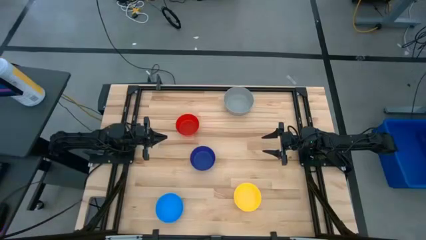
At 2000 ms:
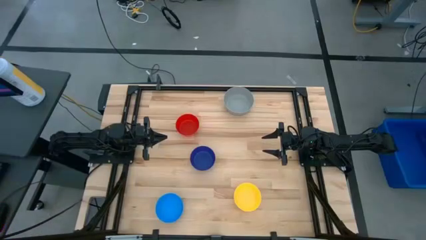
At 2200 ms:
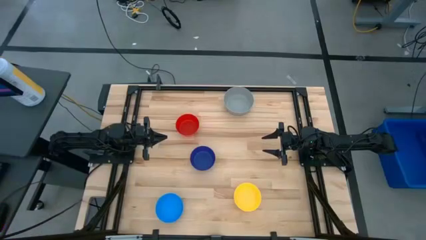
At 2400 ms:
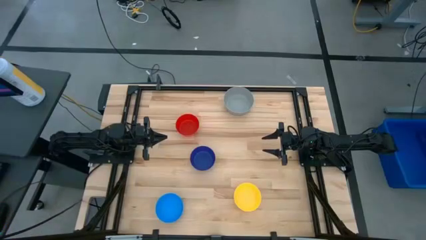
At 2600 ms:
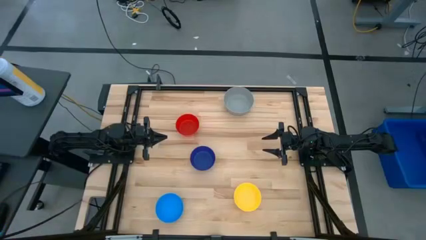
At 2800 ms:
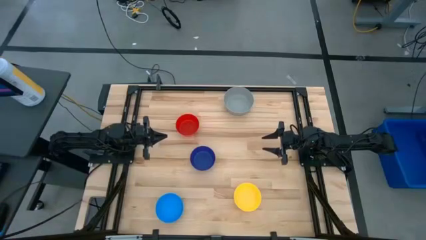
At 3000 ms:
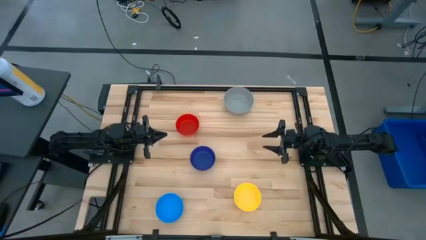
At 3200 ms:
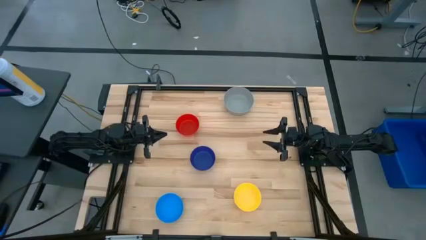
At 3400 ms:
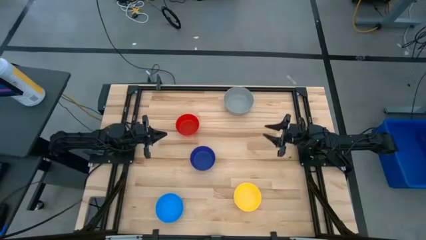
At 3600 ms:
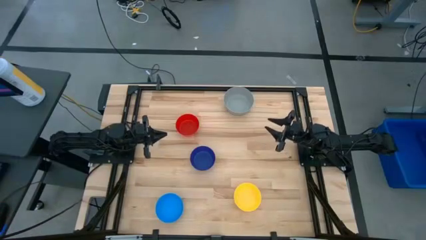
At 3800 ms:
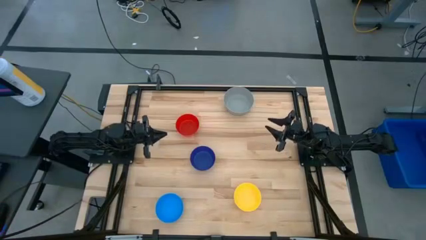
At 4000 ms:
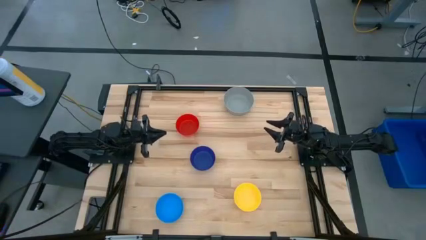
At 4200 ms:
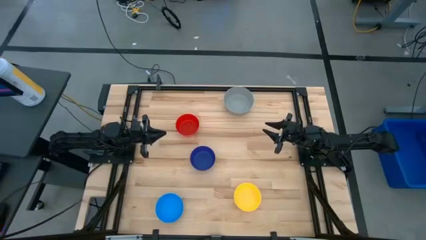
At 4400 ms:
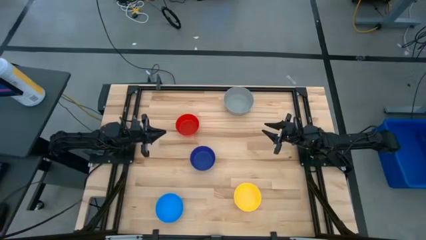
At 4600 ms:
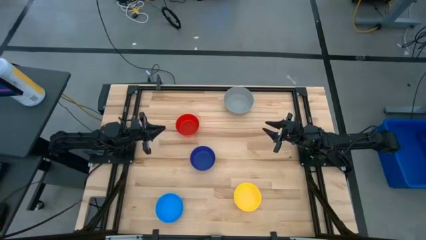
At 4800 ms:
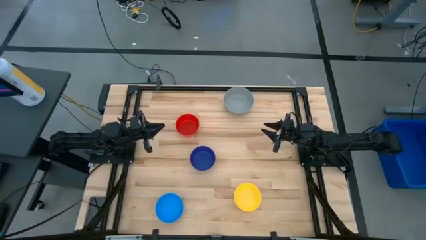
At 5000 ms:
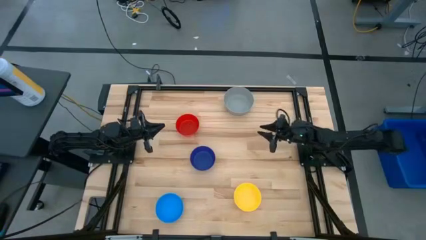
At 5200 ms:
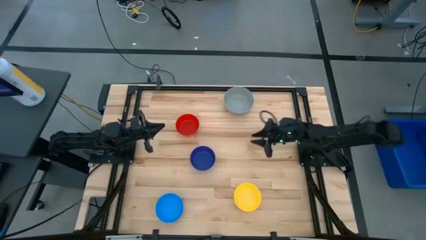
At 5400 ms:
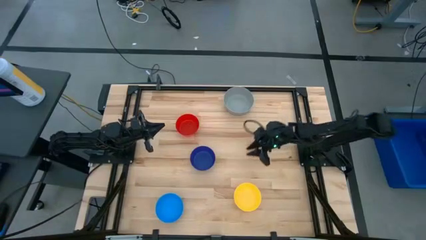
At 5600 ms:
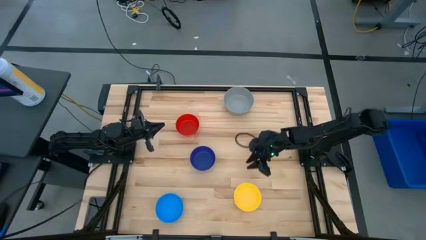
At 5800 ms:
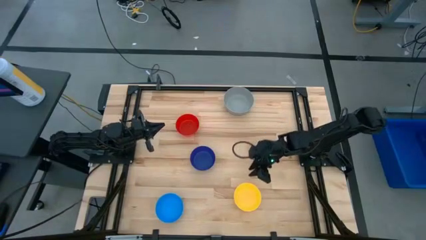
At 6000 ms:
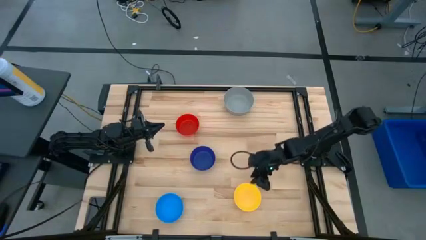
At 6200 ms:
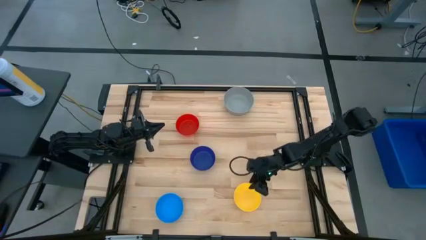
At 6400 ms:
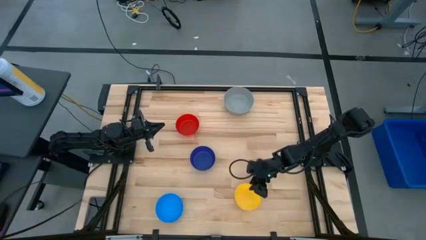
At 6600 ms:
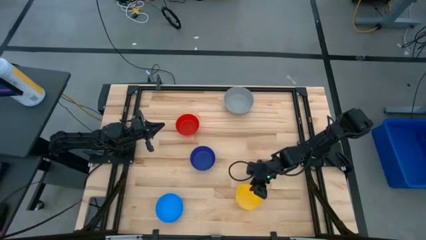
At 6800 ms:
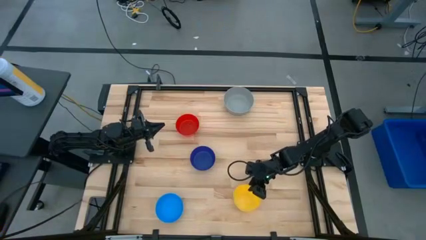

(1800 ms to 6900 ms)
Stack the yellow bowl on the gray bowl

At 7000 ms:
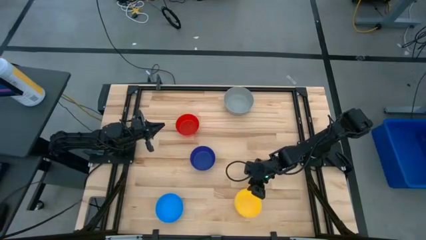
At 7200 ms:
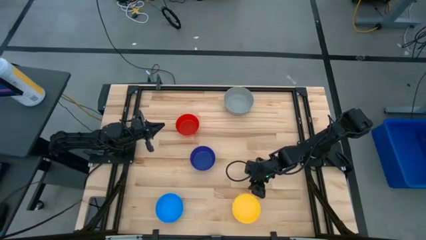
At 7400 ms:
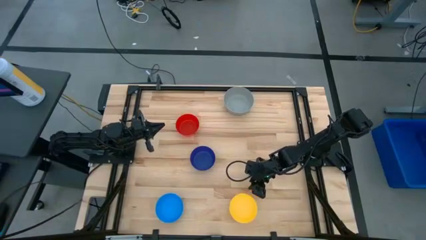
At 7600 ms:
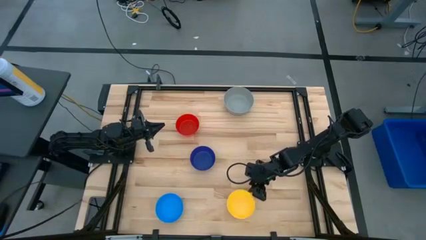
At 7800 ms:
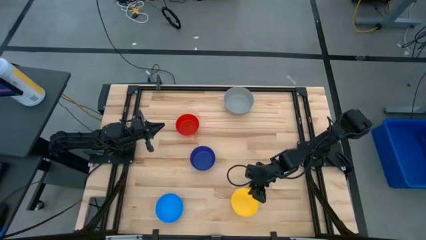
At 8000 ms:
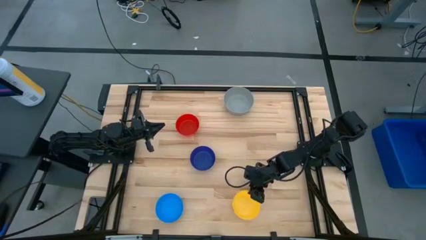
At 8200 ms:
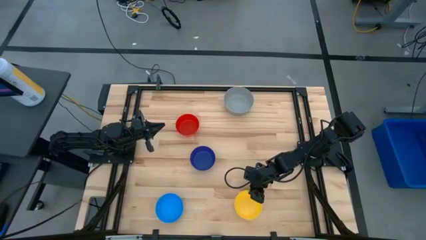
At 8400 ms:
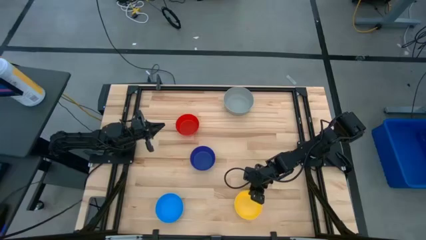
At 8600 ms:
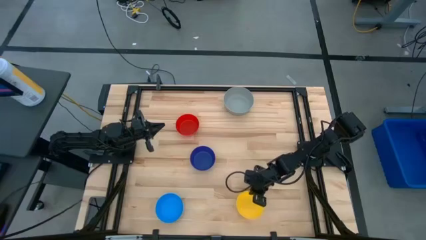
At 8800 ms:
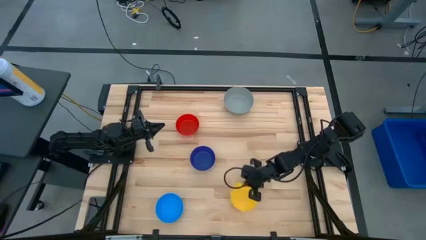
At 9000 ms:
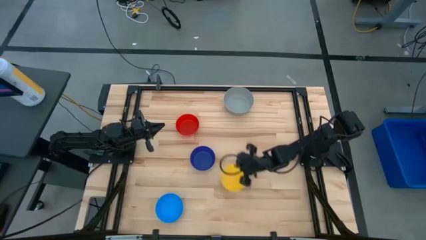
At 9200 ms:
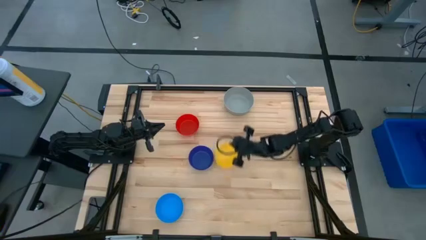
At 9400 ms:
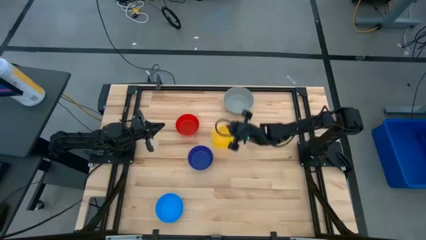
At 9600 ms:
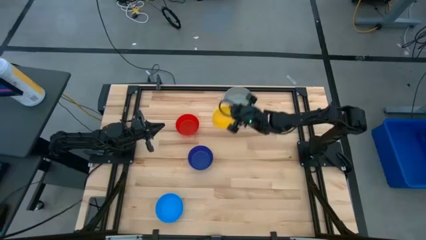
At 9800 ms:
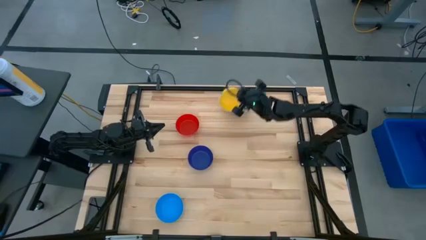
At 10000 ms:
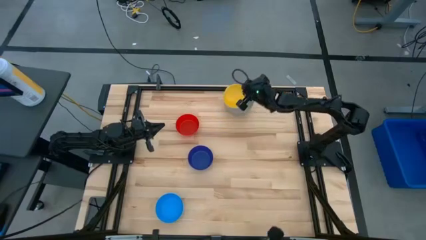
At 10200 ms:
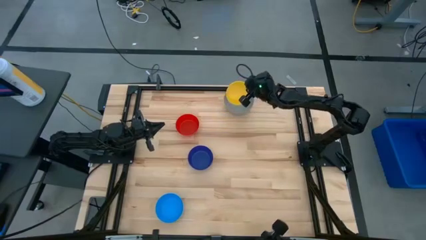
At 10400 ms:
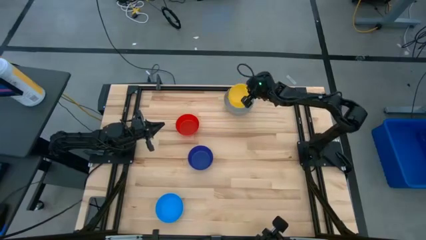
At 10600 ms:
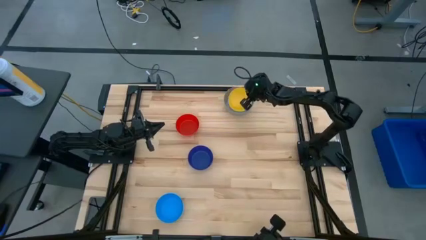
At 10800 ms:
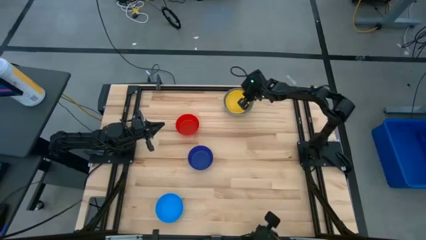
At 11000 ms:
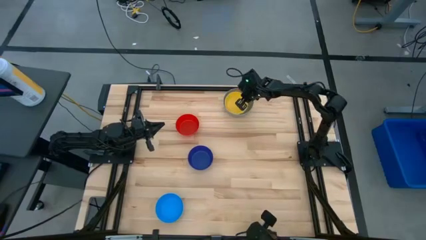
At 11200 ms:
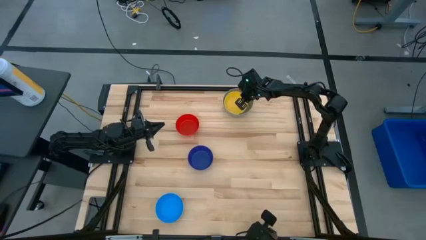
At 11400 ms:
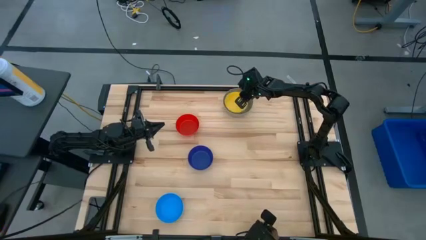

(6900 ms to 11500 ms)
Stack the yellow bowl on the gray bowl

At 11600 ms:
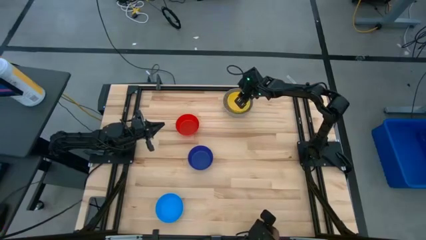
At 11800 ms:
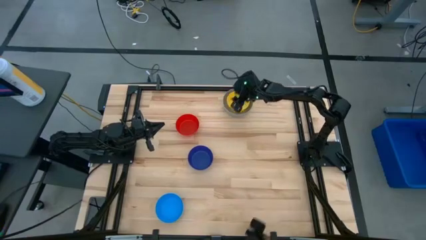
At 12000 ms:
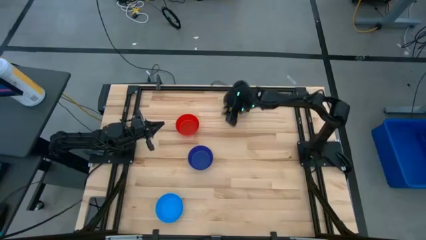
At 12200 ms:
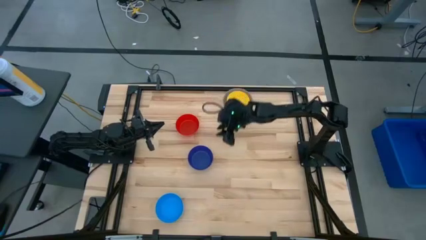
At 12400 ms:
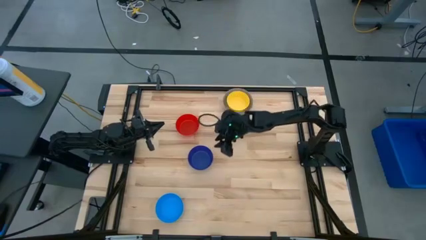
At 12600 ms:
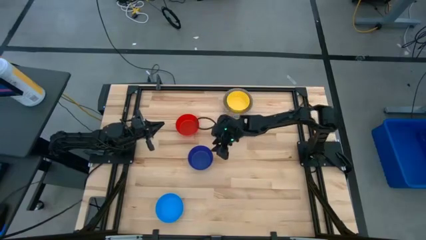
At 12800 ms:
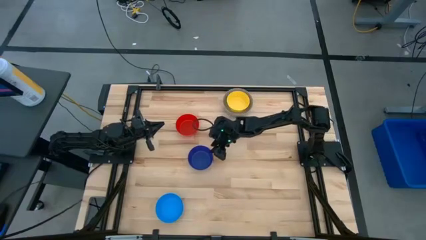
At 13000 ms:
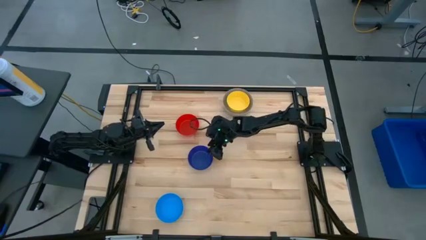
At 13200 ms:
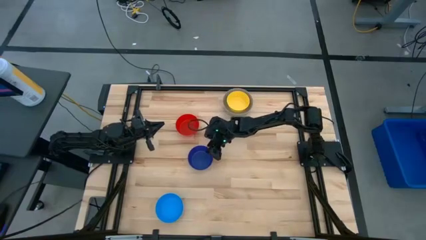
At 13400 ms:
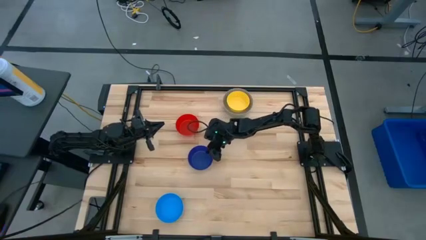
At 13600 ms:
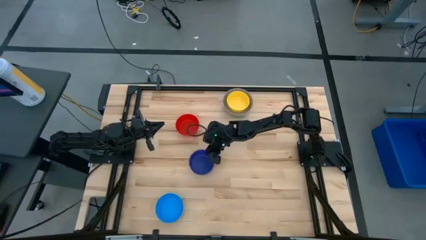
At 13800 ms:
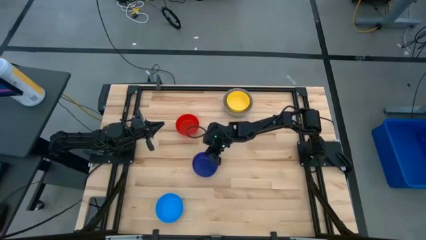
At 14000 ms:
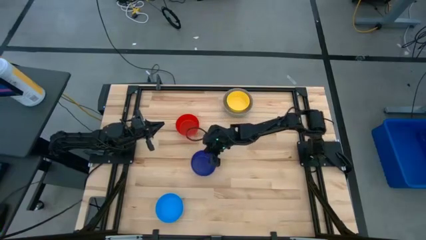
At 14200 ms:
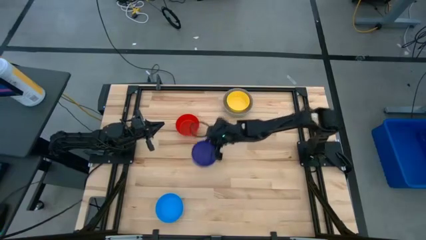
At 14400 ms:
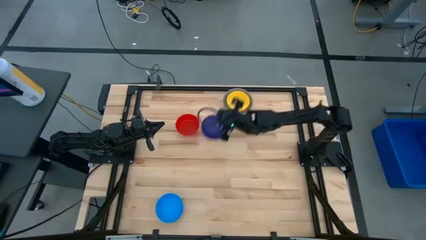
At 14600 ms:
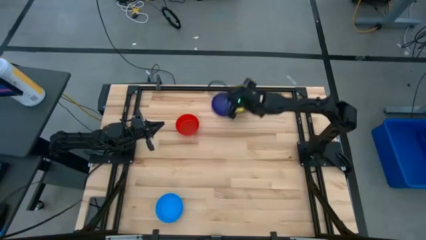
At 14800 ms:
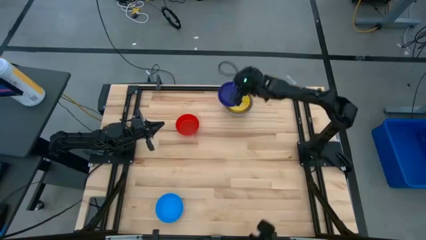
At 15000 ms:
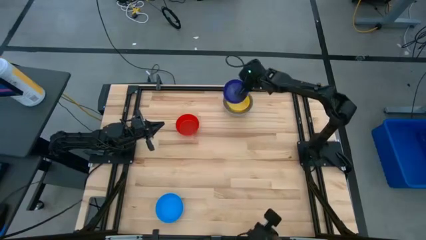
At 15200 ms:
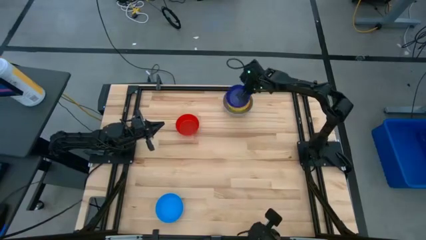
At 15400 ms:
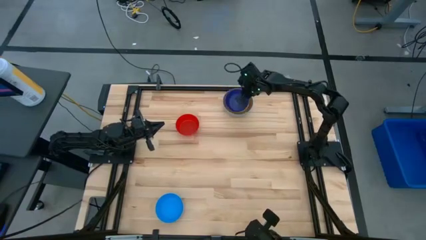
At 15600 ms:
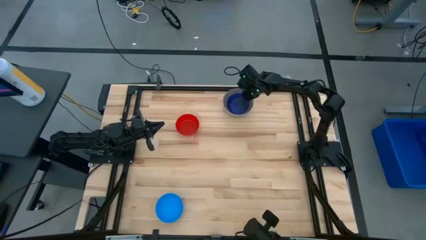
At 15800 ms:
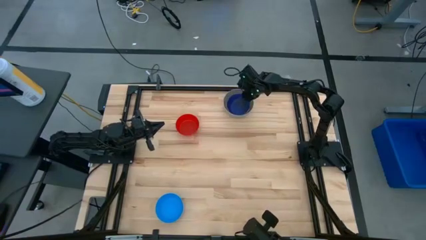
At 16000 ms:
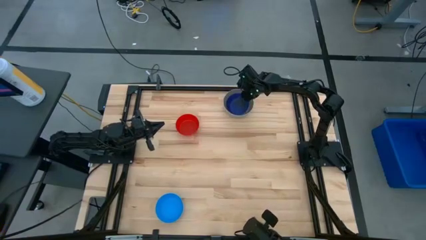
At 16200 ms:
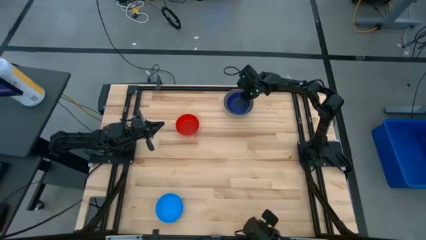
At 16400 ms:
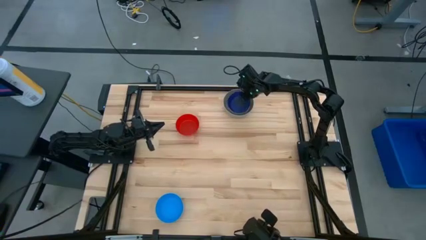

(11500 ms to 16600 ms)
Stack the dark blue bowl on the yellow bowl

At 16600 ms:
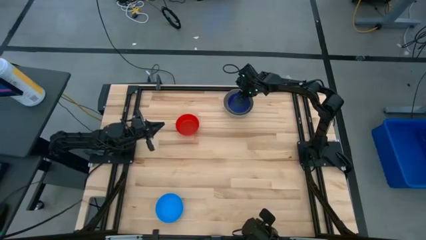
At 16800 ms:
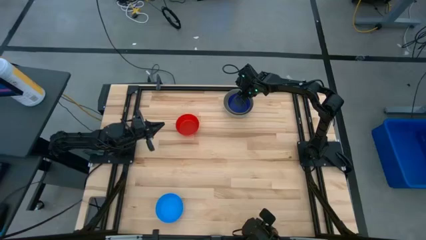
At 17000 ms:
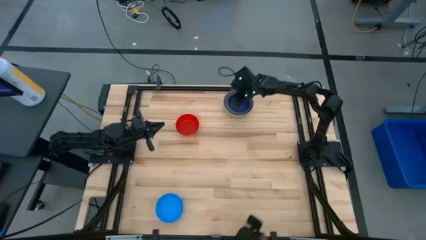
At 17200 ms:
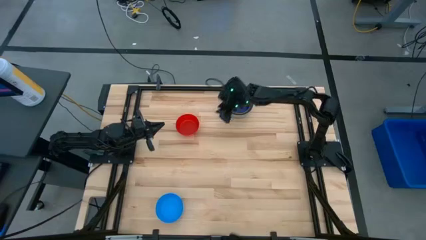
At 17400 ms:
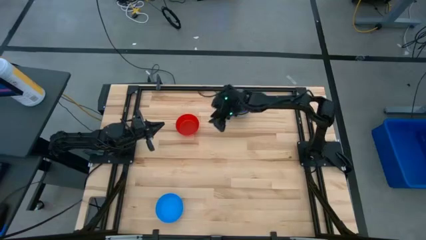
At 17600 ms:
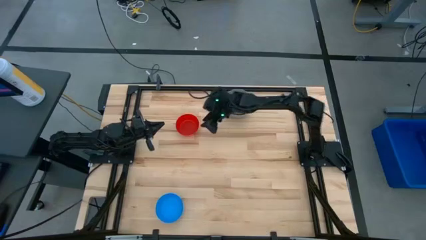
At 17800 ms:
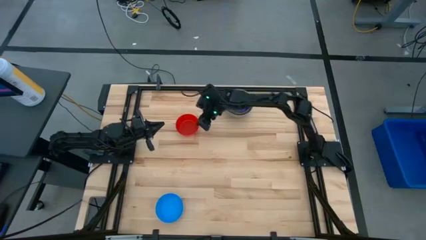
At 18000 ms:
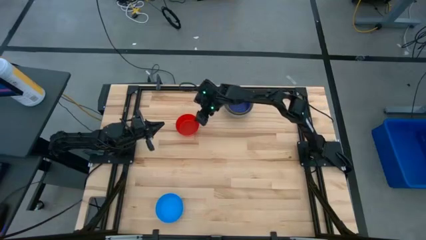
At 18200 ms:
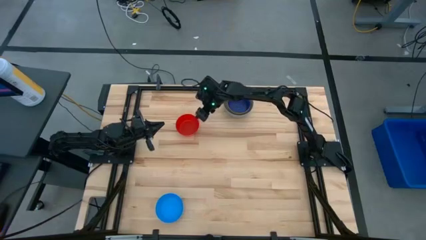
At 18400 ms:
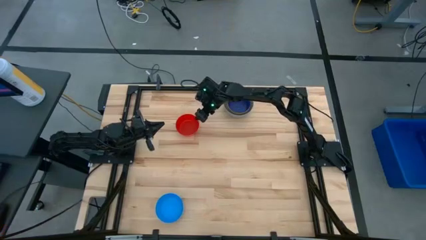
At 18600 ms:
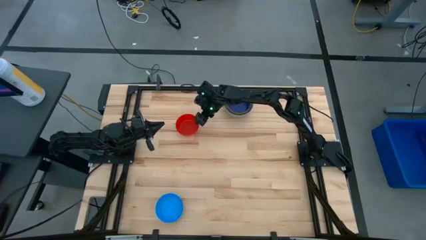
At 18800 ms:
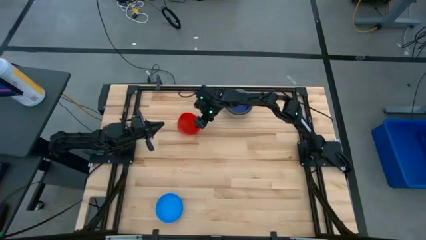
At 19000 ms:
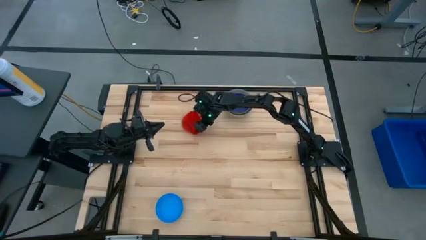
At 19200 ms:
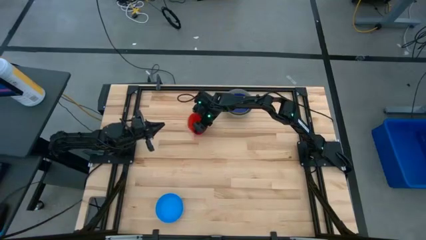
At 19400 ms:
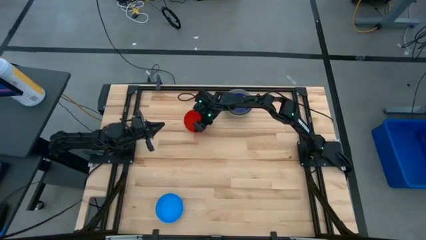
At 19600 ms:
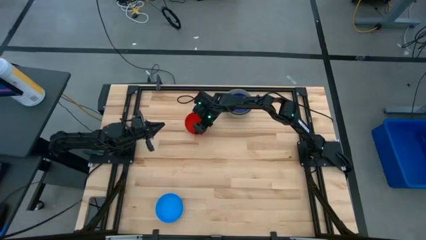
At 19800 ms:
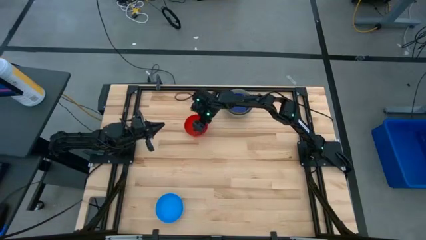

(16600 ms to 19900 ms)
Stack the red bowl on the dark blue bowl
